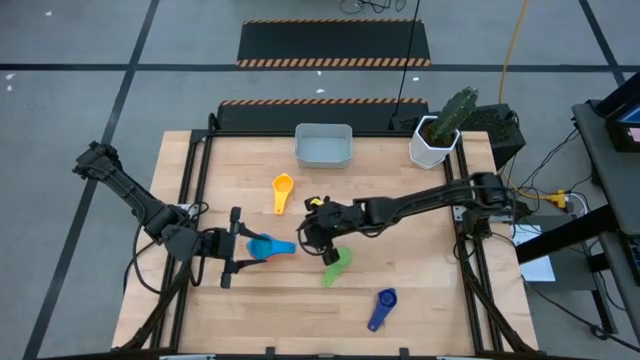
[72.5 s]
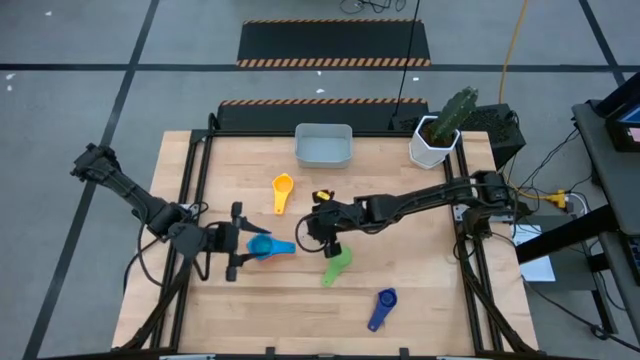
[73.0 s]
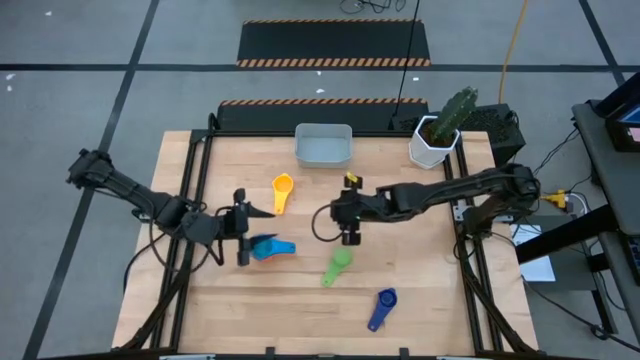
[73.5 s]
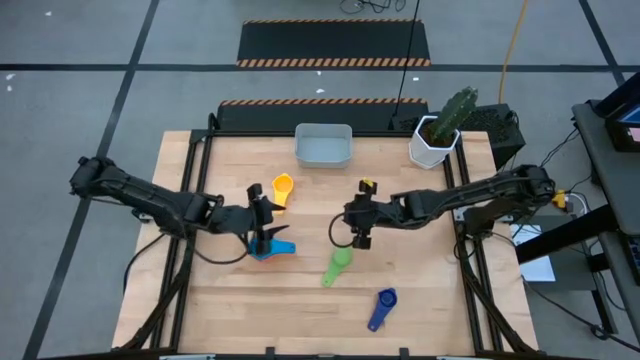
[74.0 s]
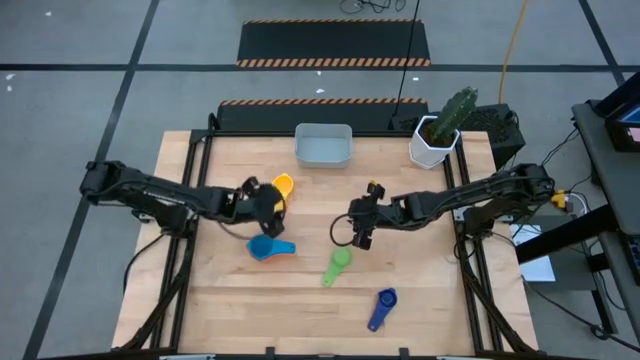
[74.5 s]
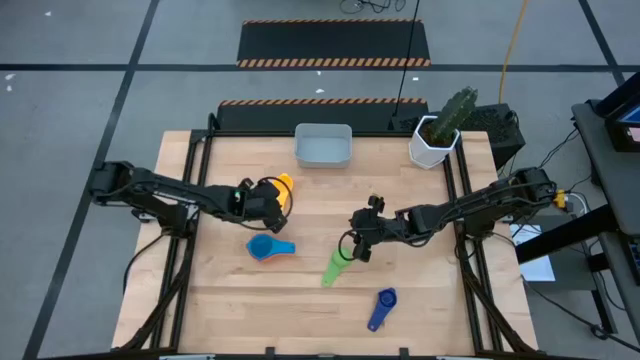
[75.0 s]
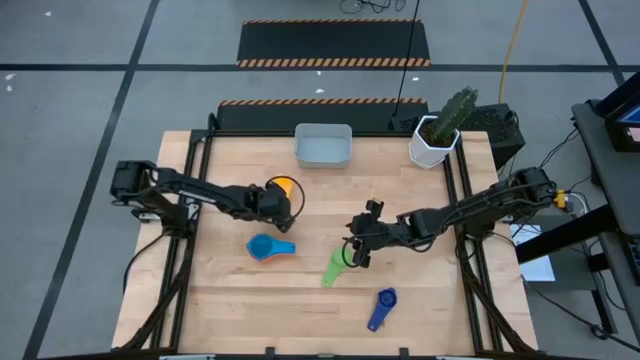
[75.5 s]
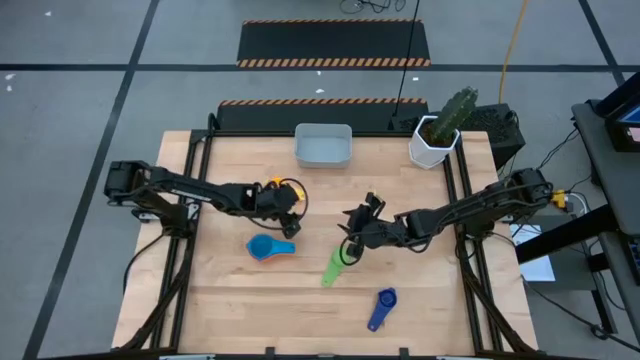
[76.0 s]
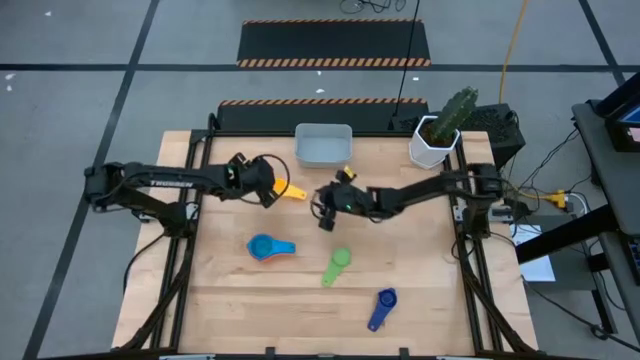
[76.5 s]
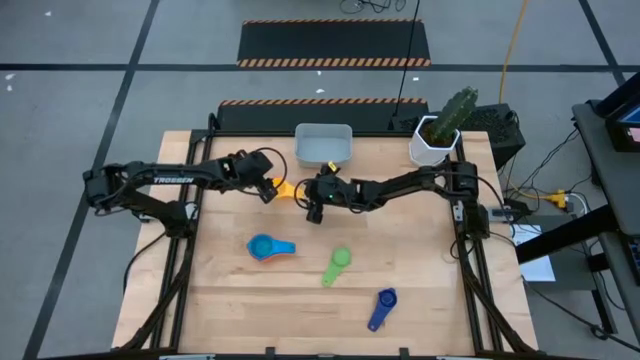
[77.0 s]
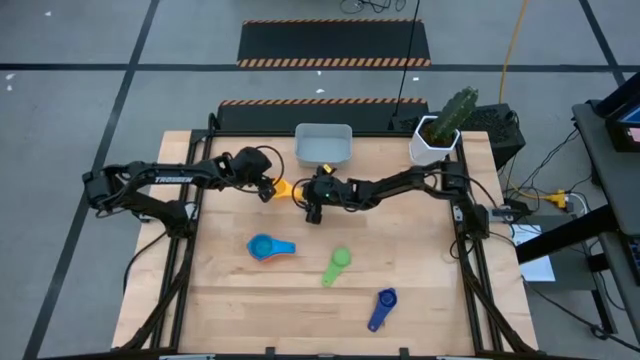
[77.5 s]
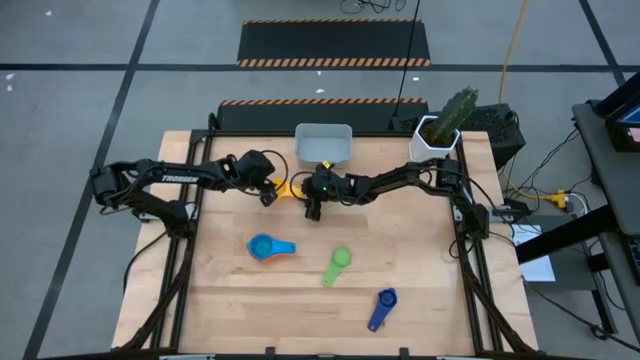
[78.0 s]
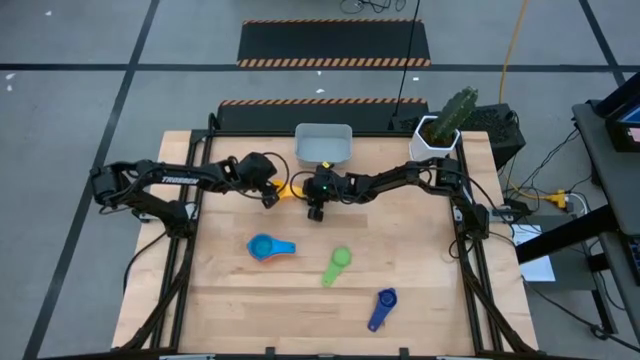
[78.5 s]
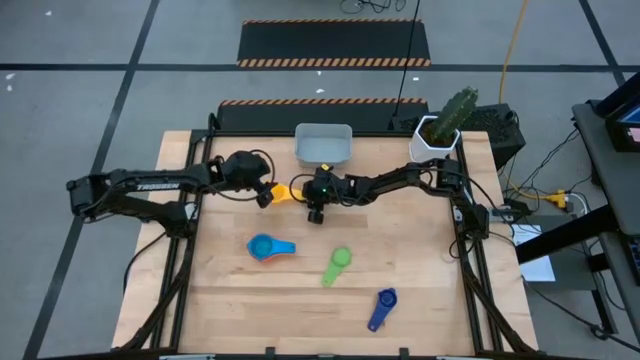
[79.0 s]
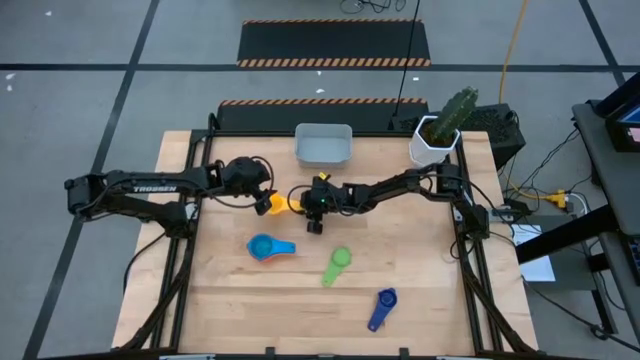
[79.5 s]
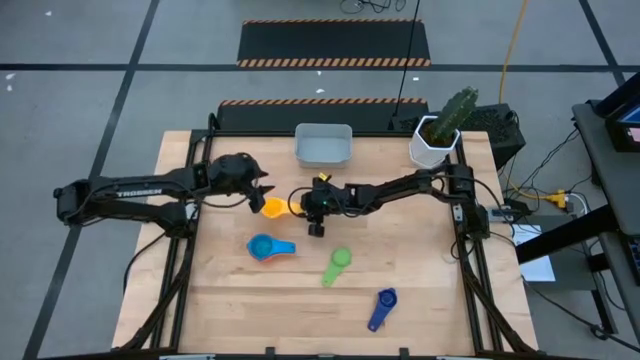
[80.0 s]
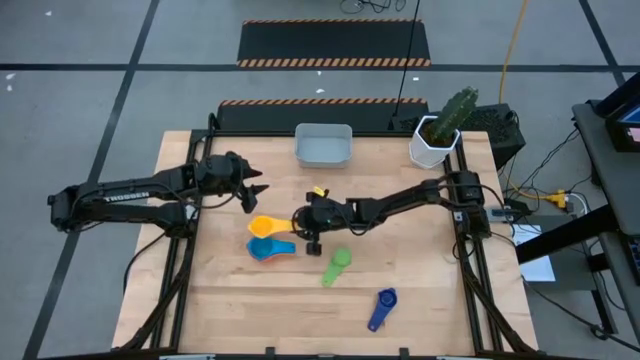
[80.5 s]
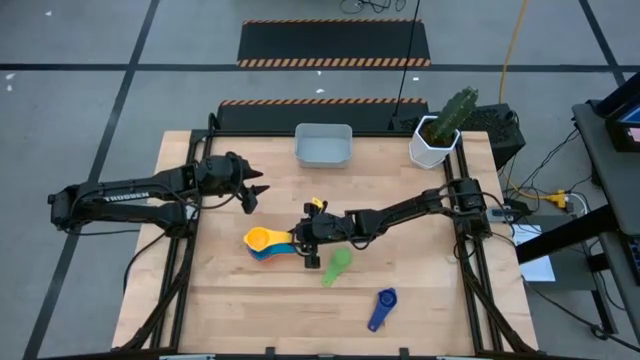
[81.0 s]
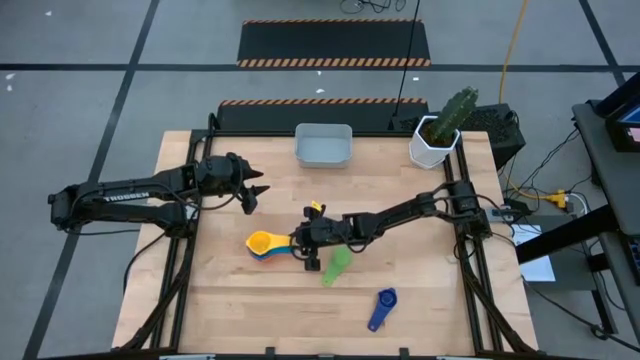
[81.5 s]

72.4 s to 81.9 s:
Task: Nest measuring cups in basket
Stack the yellow measuring cup into the light blue measuring cup

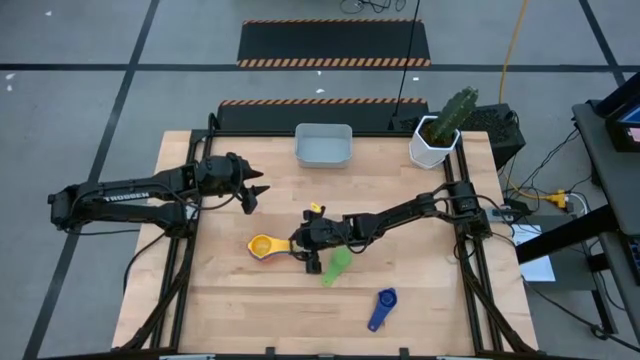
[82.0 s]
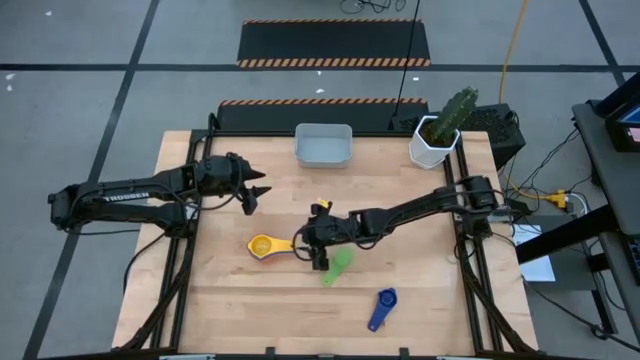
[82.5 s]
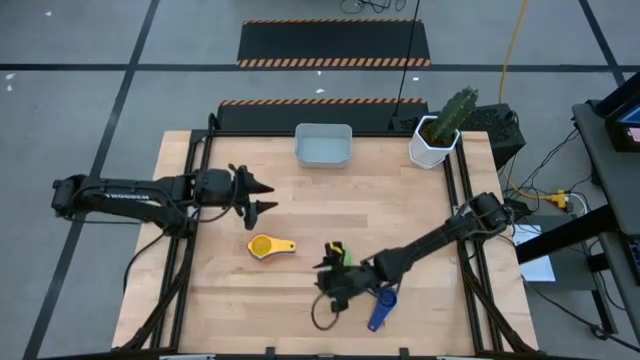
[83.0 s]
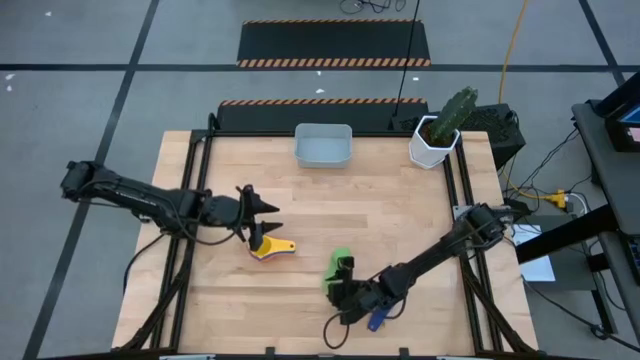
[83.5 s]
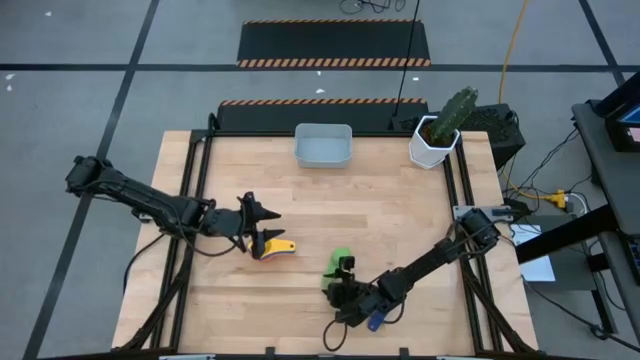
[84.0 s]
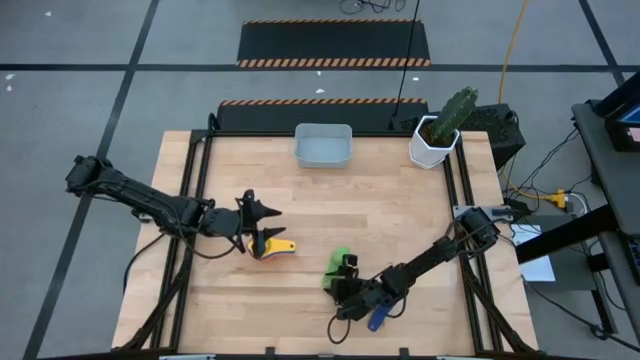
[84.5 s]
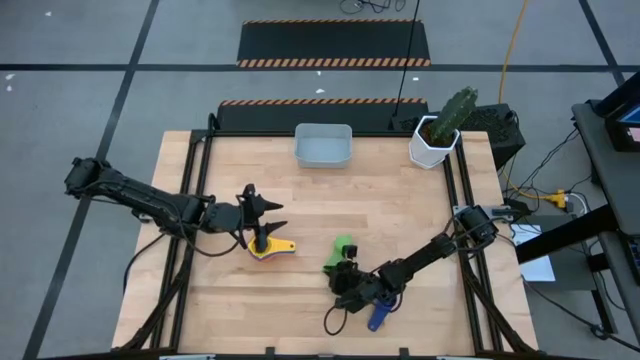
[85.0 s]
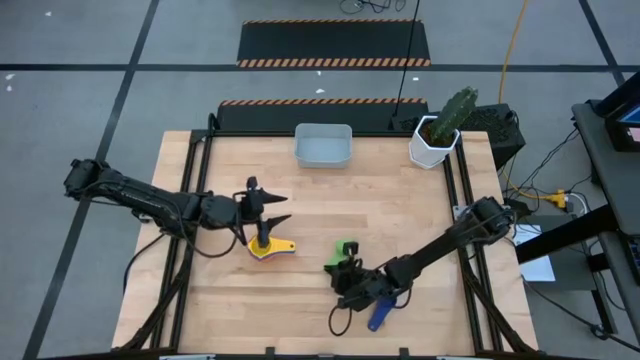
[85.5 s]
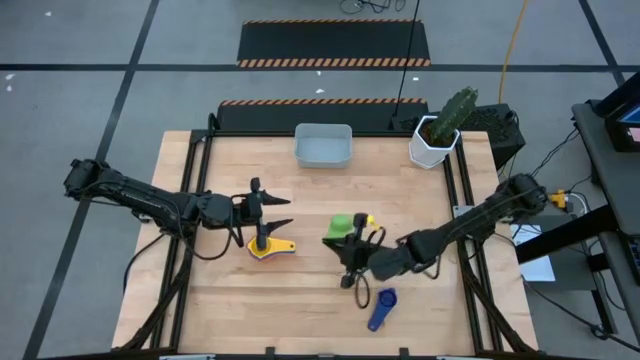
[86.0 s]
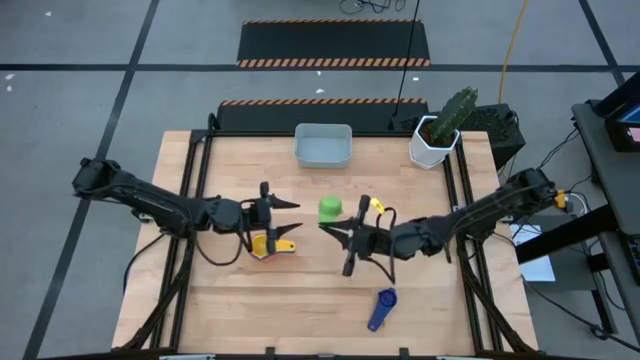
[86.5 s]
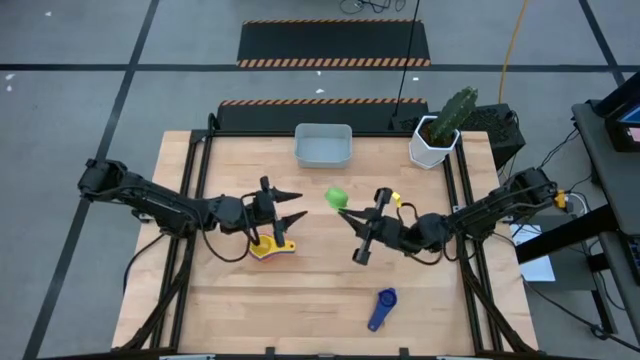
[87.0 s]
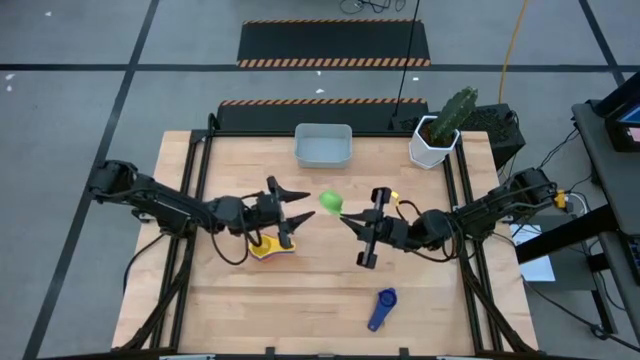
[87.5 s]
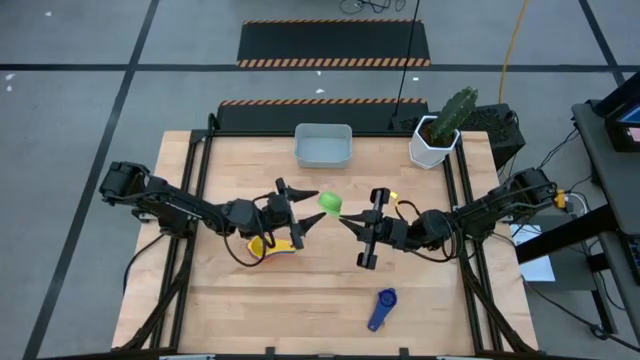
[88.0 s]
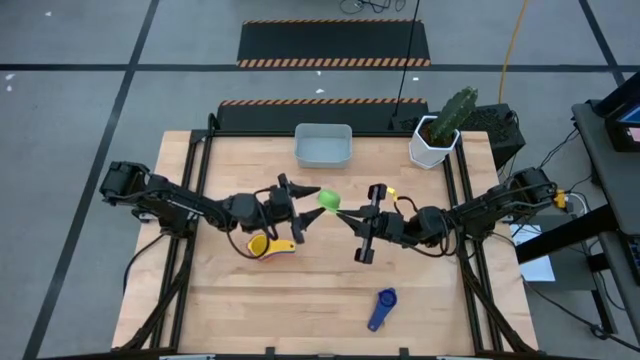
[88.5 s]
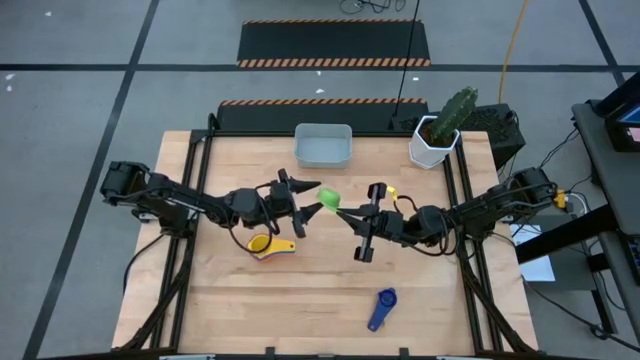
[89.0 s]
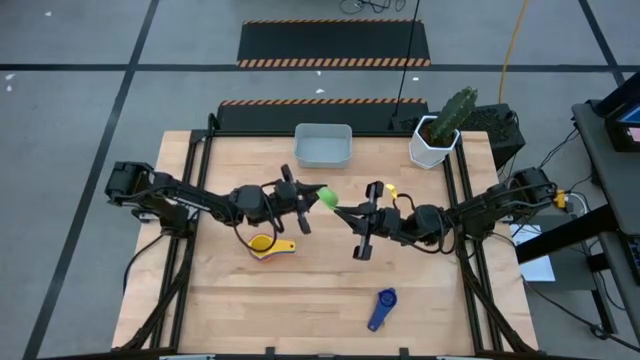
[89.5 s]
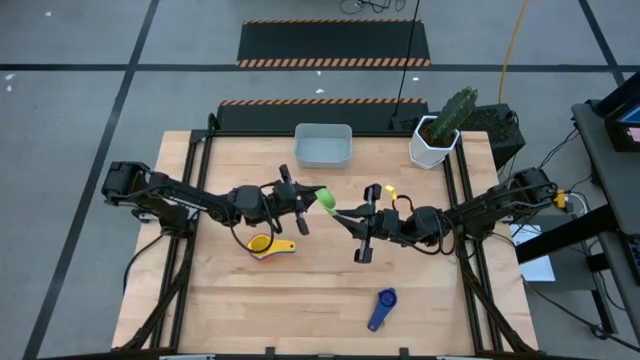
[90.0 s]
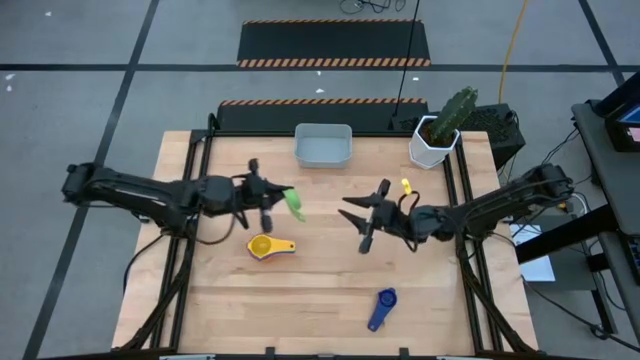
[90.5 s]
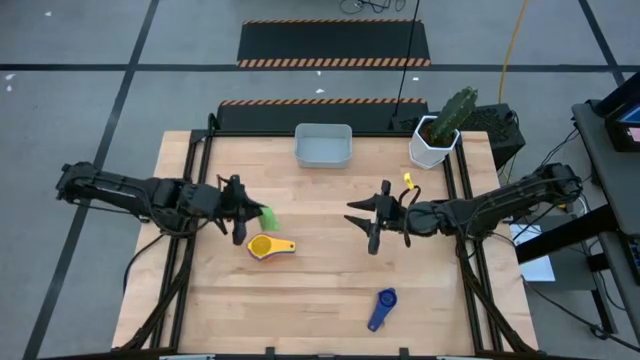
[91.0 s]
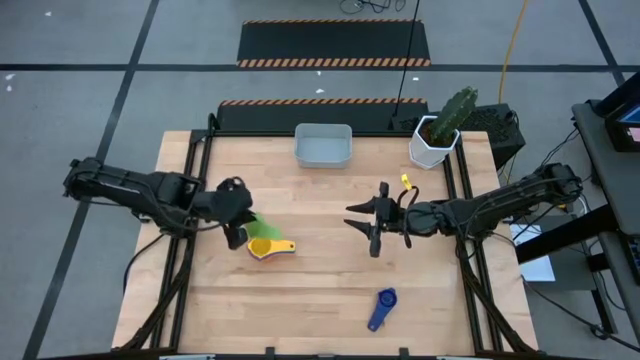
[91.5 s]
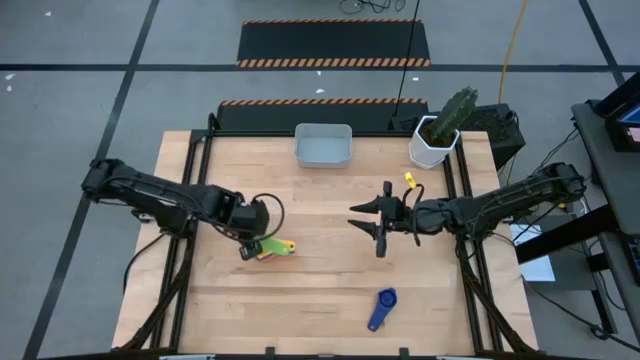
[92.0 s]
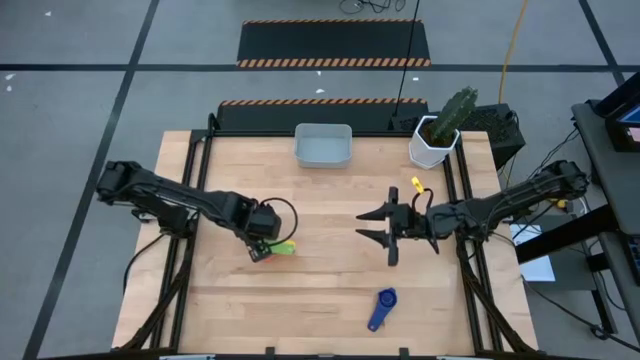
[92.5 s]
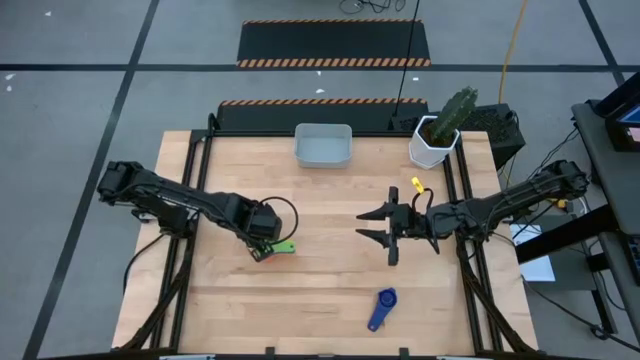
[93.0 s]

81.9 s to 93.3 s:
Stack the green measuring cup into the yellow measuring cup
